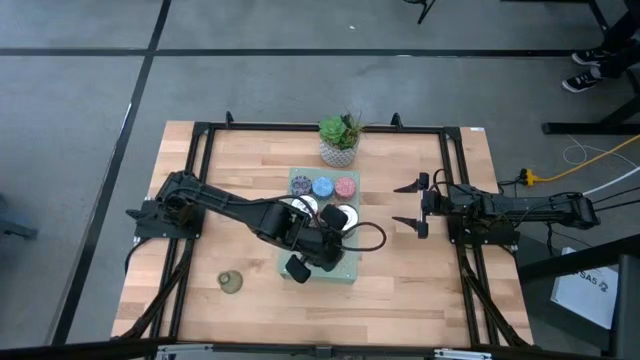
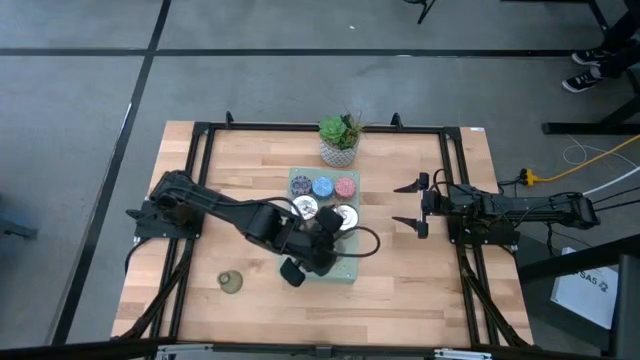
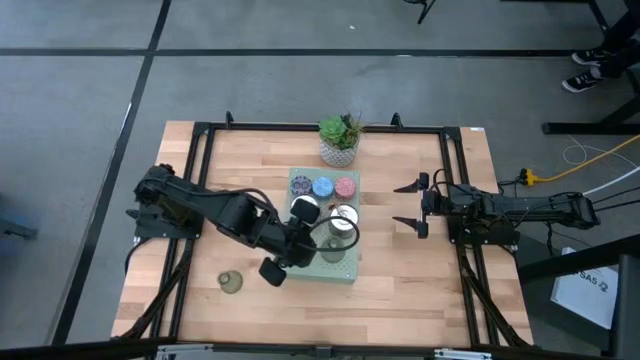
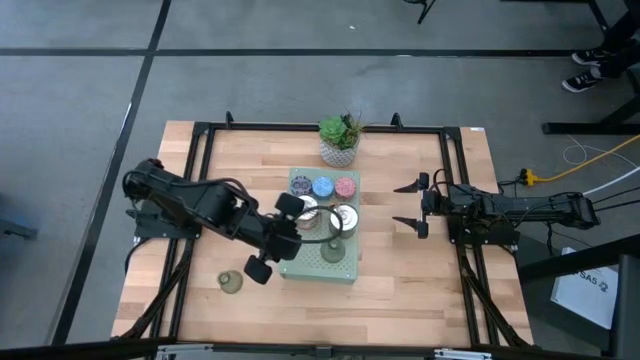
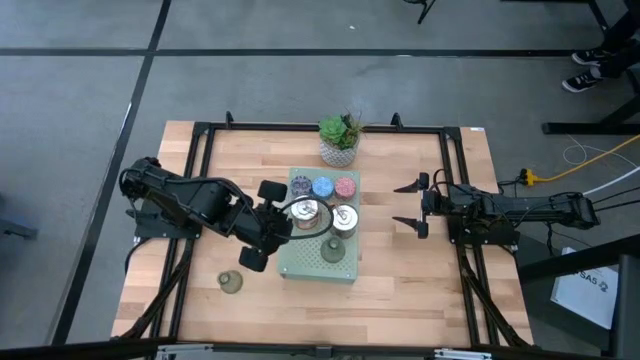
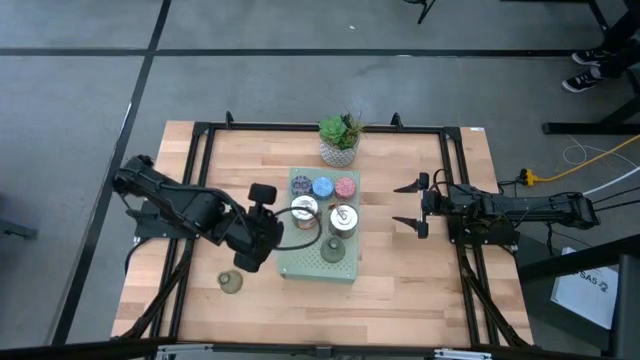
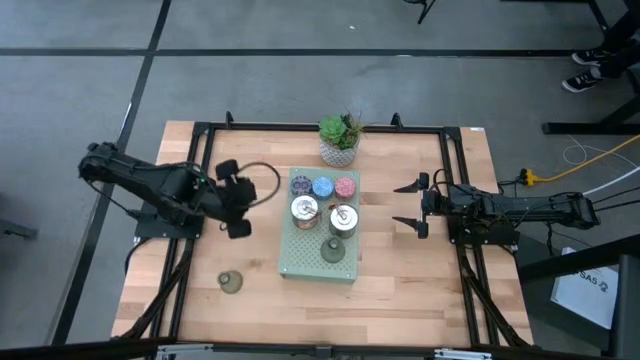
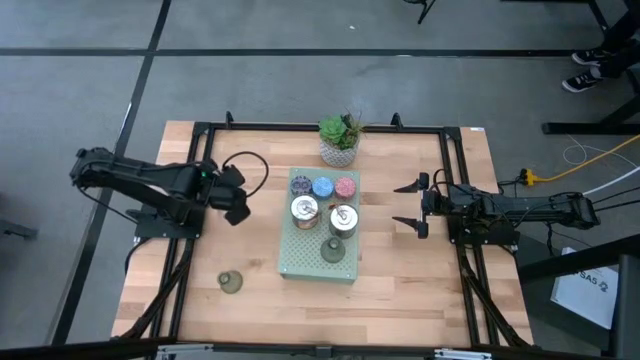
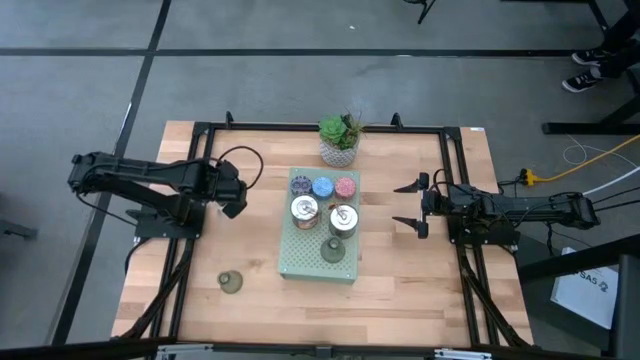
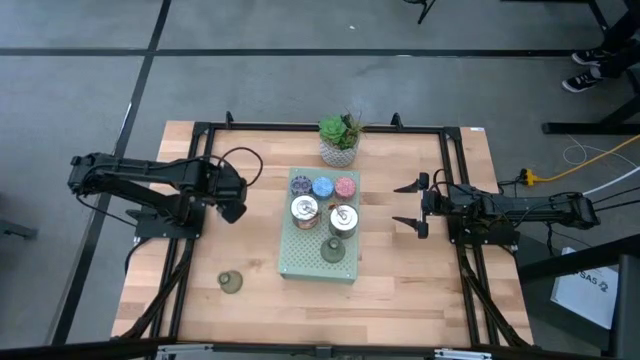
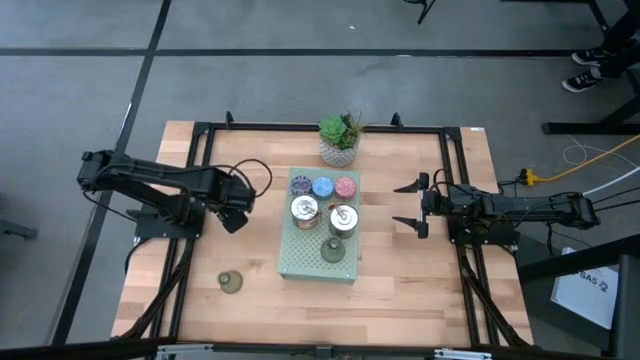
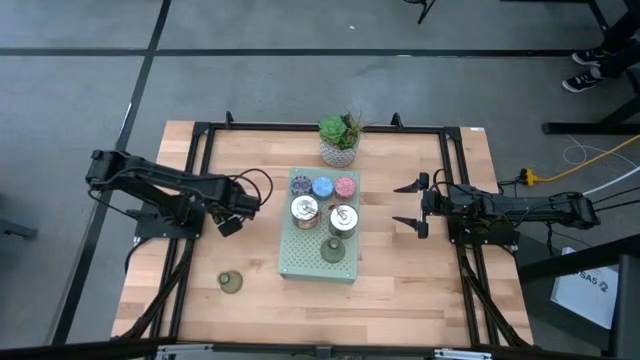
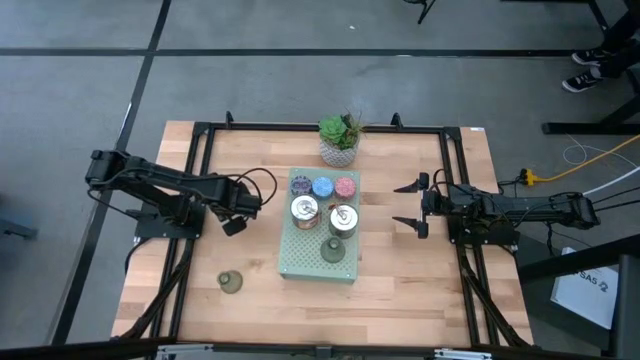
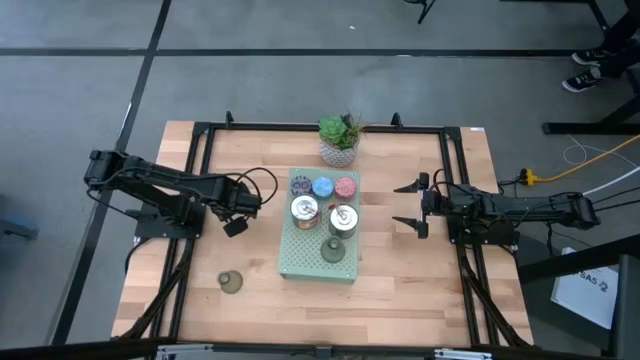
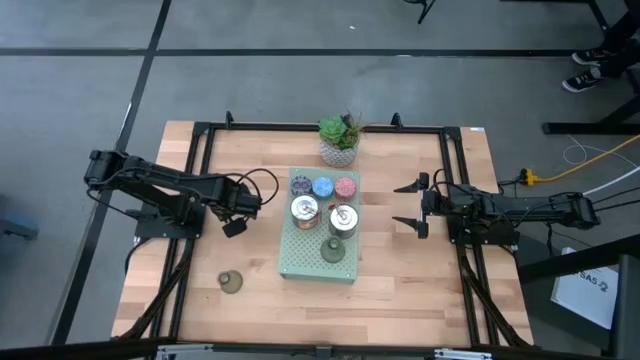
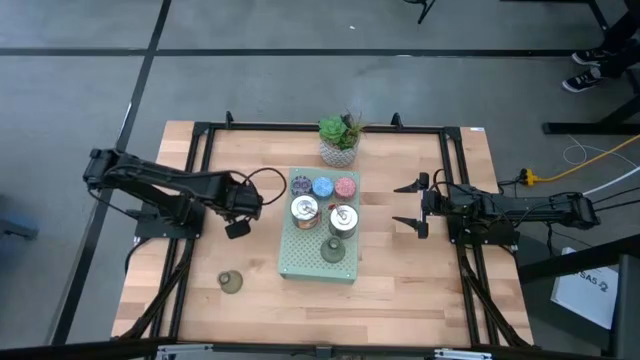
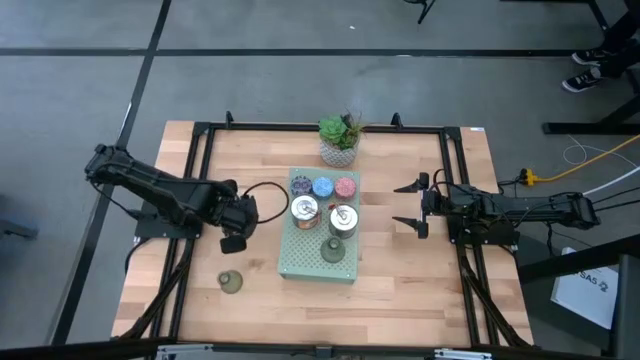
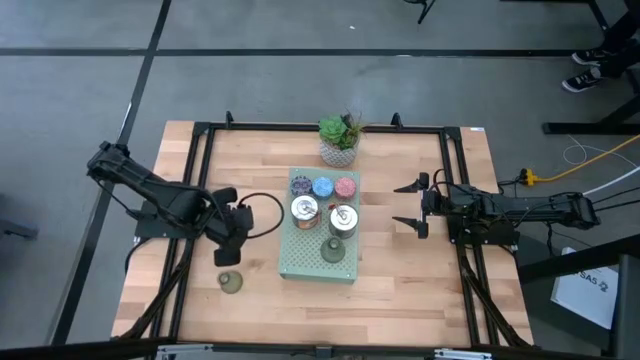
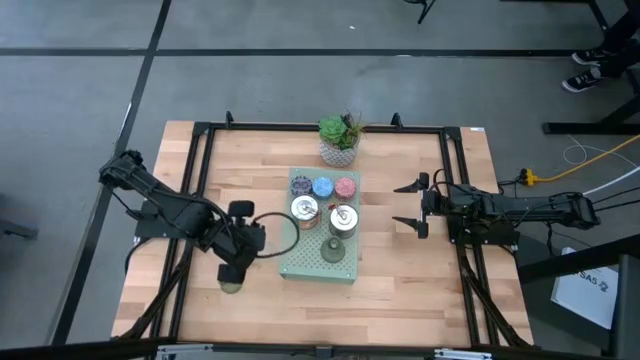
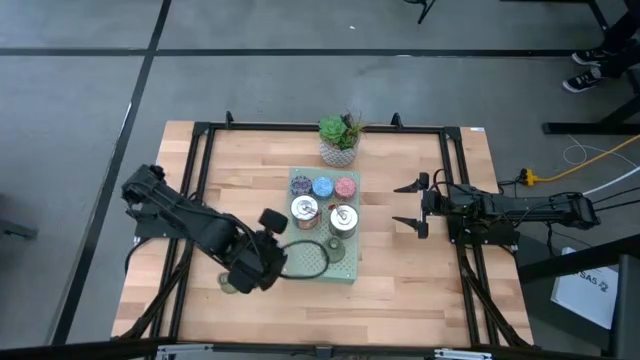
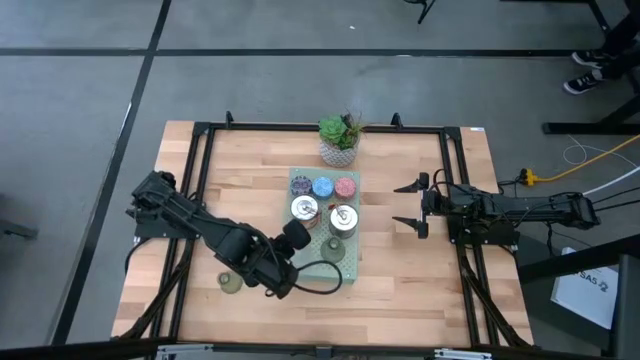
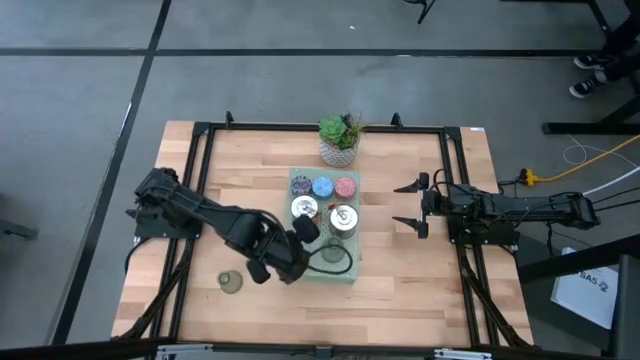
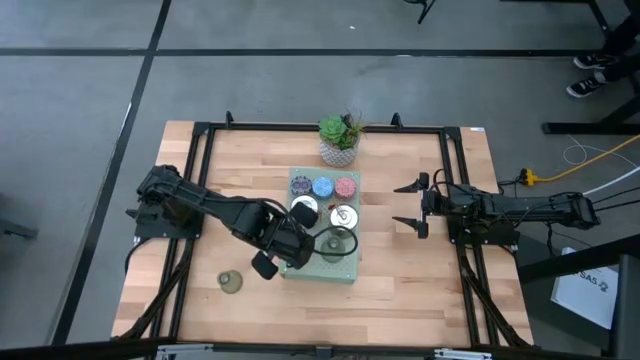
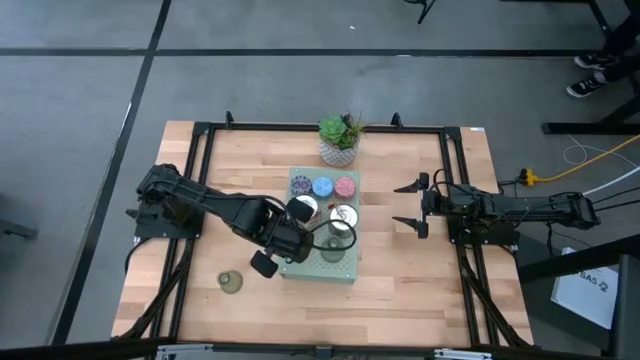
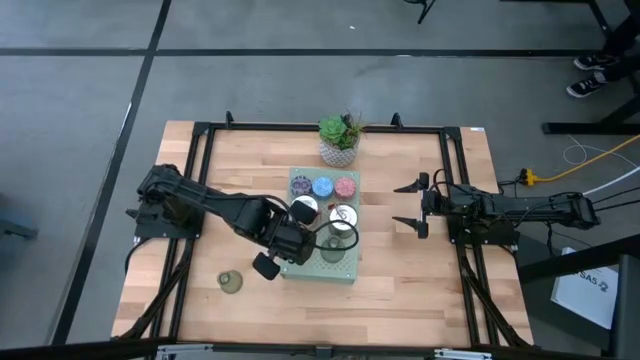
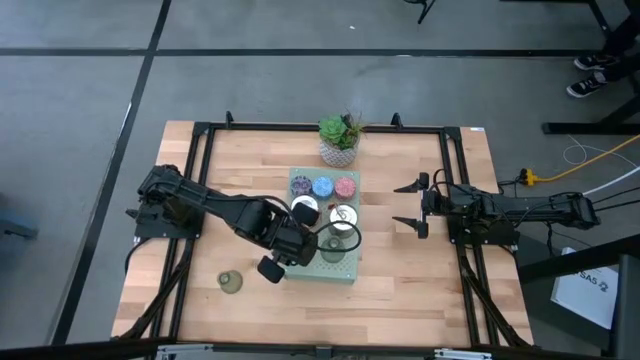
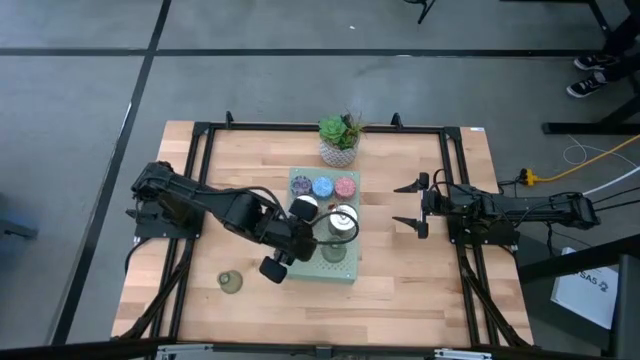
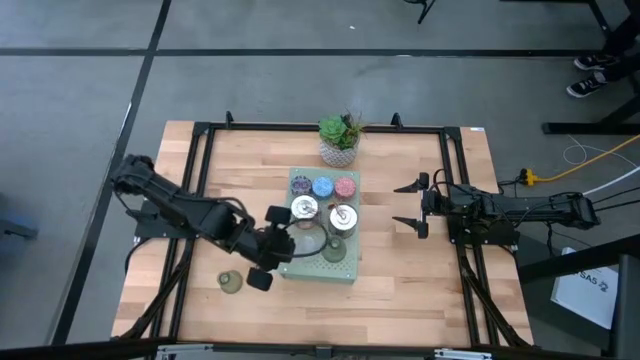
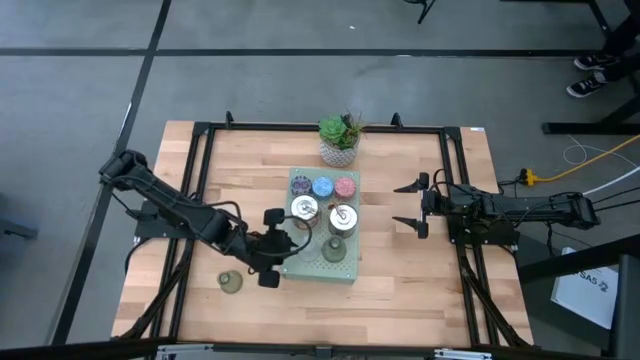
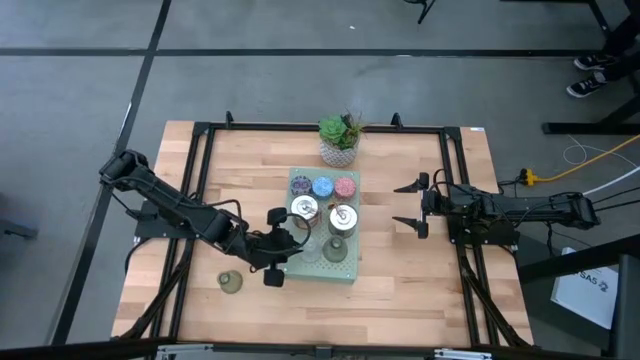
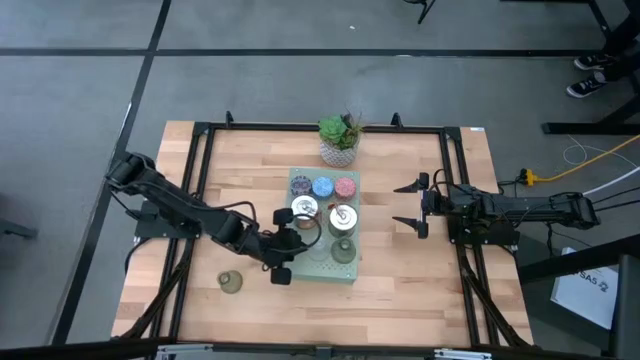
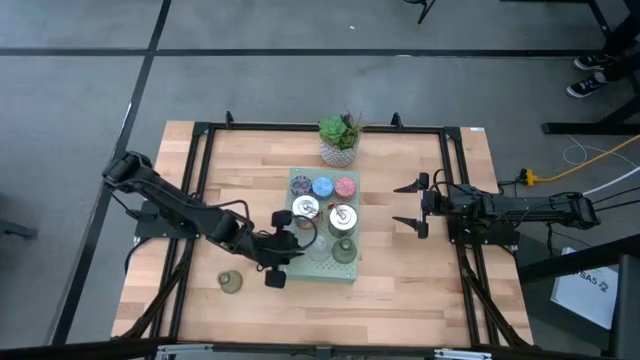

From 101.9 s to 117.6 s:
Task: Pick & Place candle stick holders
Put the transparent vase candle holder on the shelf

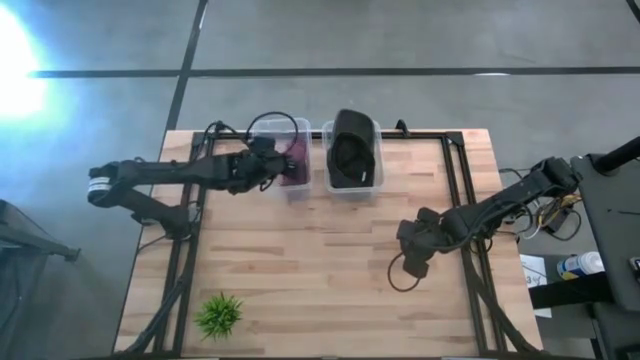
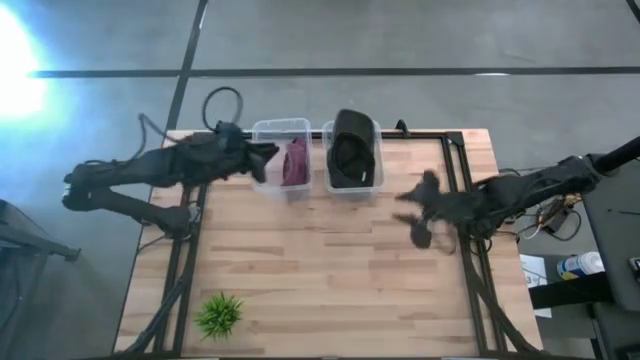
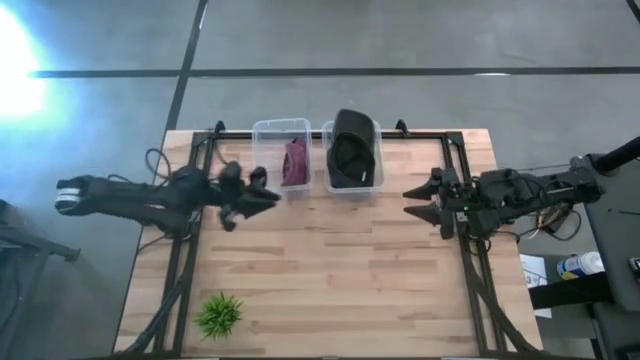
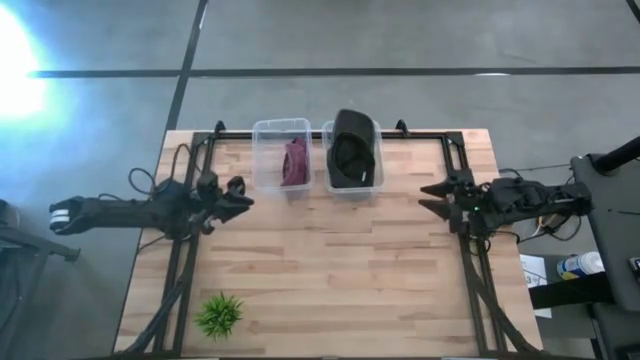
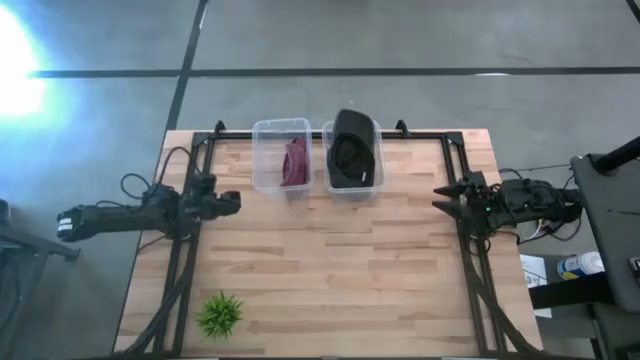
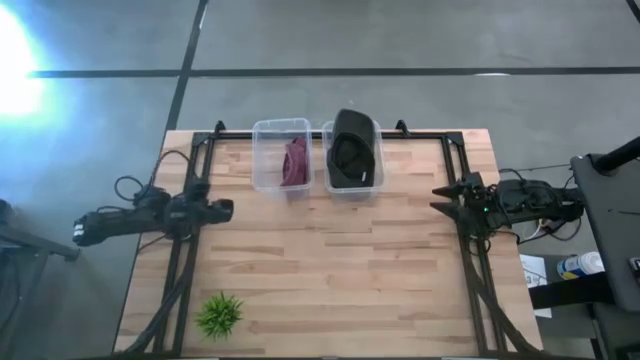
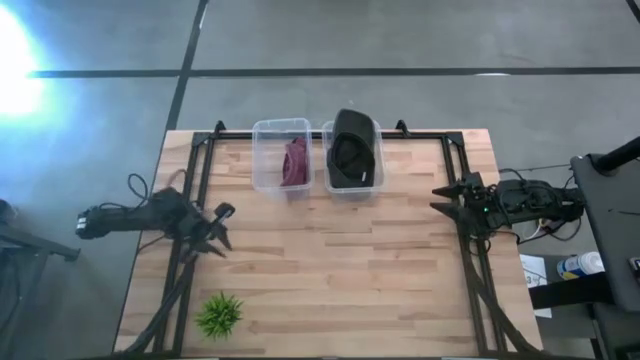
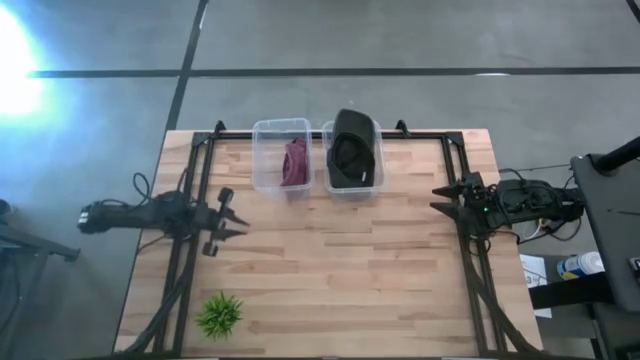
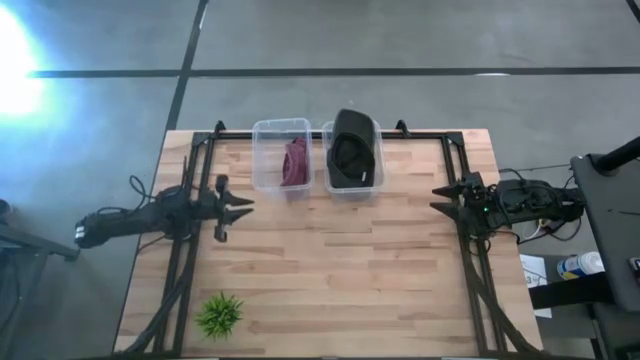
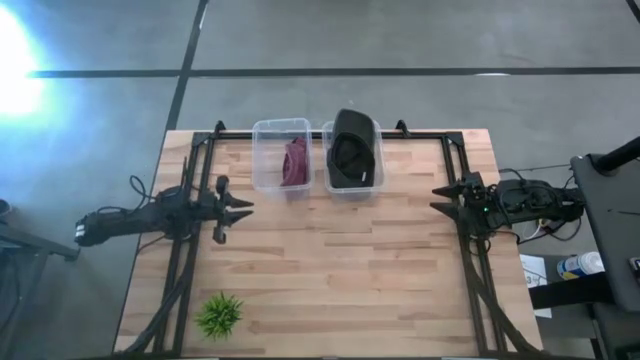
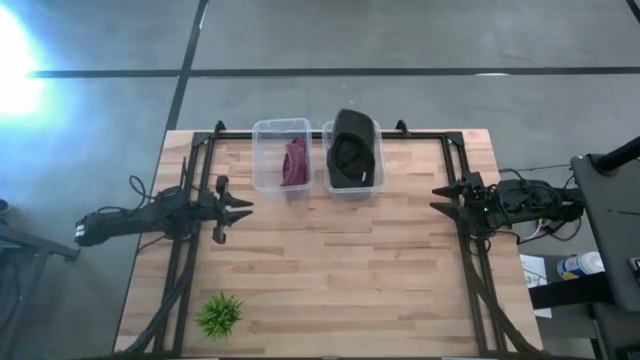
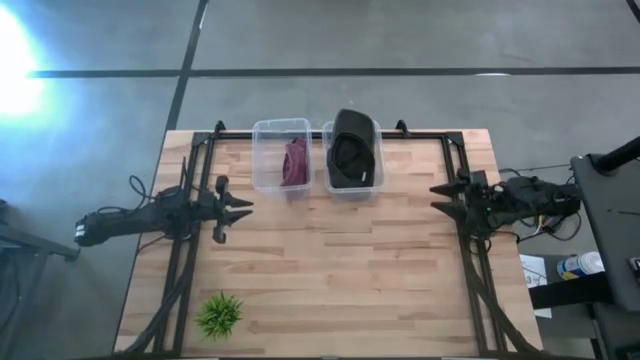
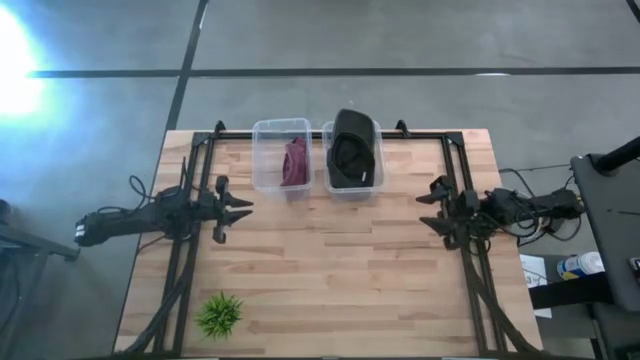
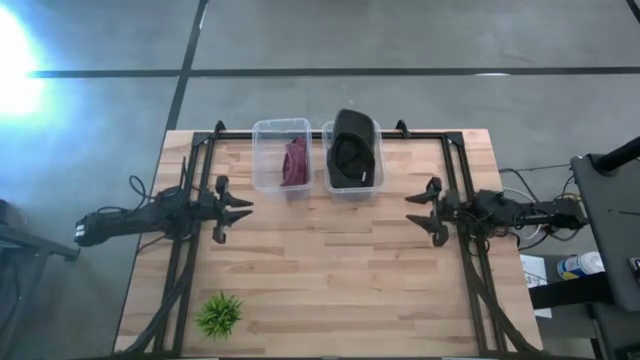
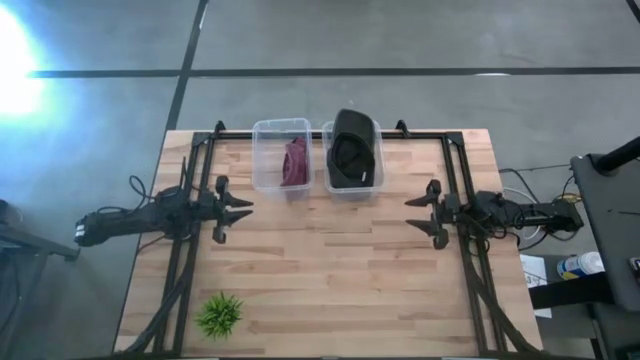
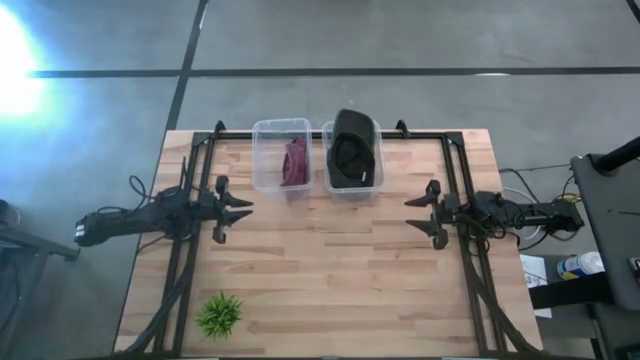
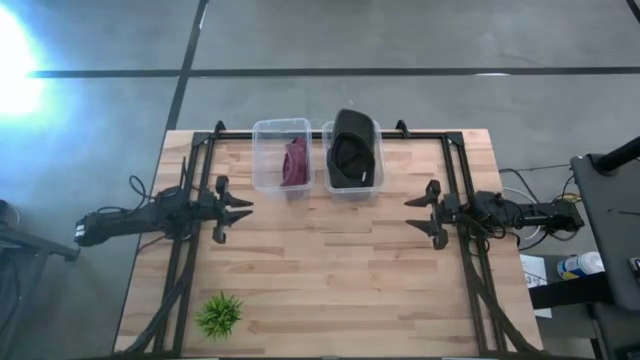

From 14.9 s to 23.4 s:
Task: Pick & Place hat
Return to Home Position
